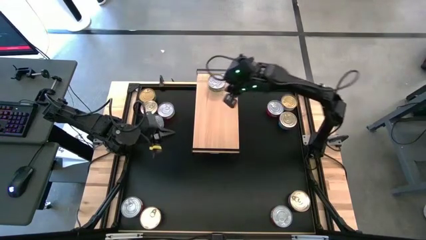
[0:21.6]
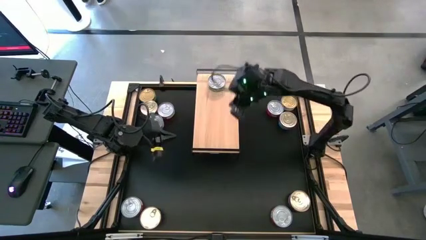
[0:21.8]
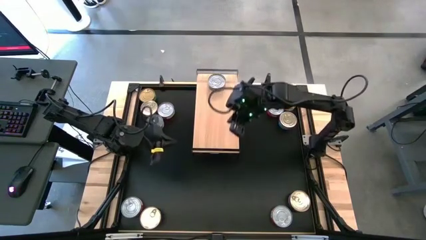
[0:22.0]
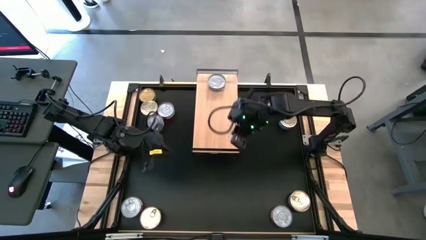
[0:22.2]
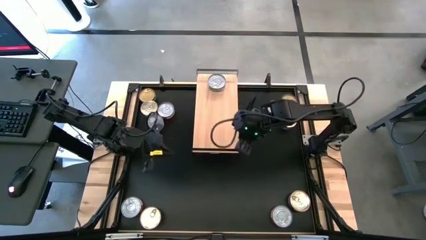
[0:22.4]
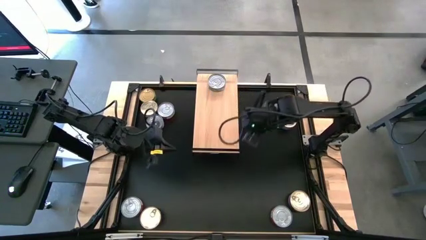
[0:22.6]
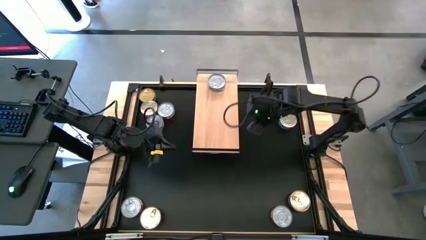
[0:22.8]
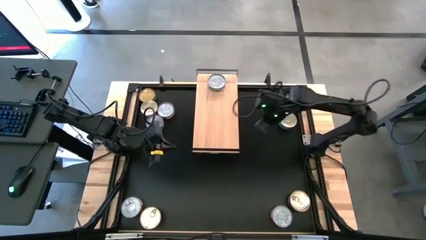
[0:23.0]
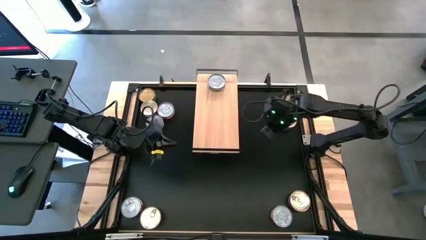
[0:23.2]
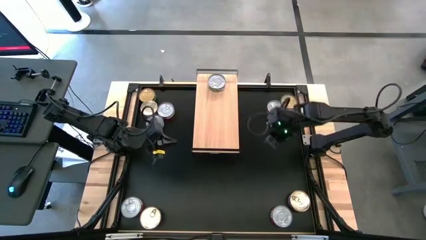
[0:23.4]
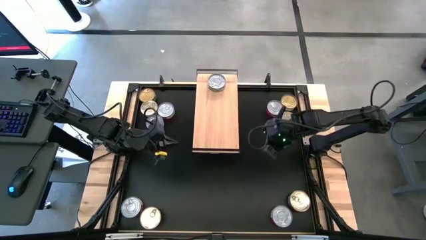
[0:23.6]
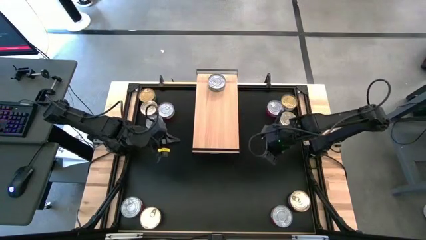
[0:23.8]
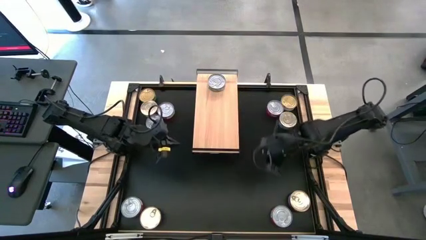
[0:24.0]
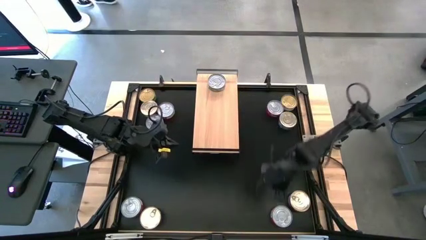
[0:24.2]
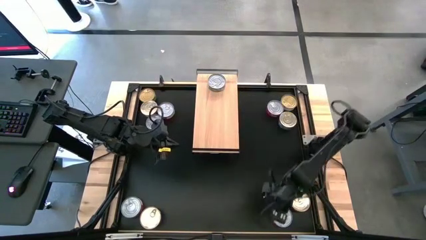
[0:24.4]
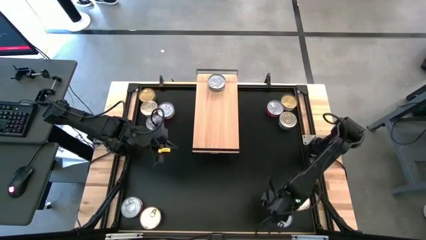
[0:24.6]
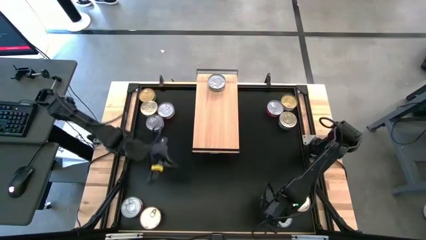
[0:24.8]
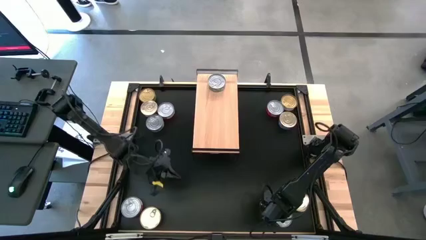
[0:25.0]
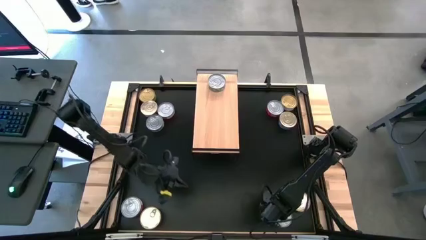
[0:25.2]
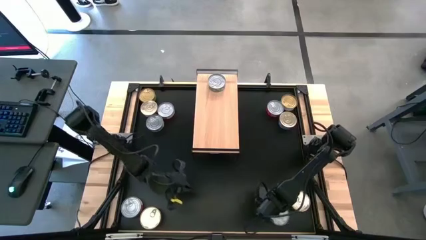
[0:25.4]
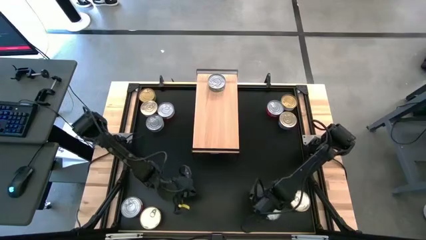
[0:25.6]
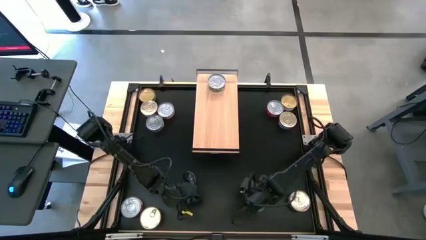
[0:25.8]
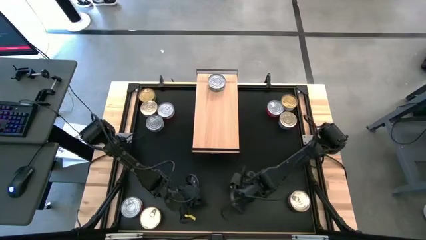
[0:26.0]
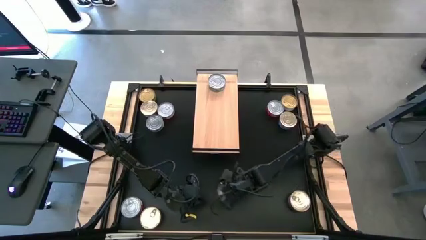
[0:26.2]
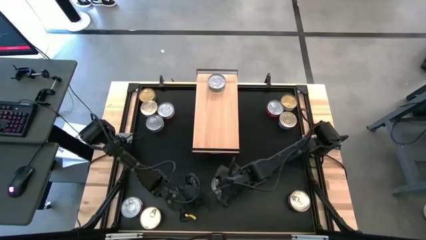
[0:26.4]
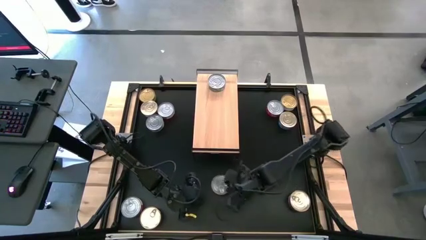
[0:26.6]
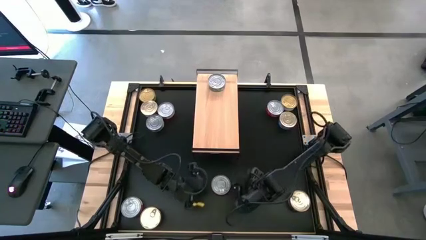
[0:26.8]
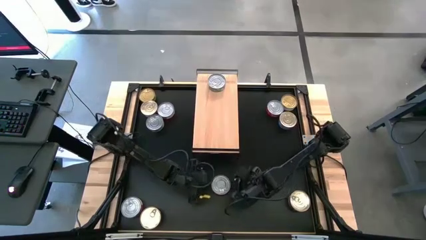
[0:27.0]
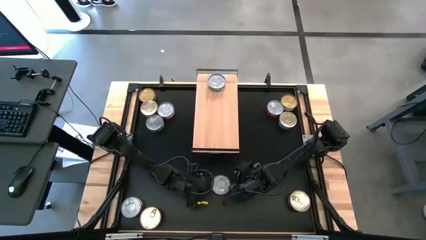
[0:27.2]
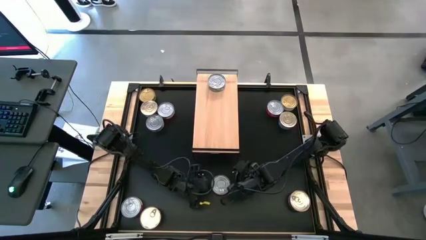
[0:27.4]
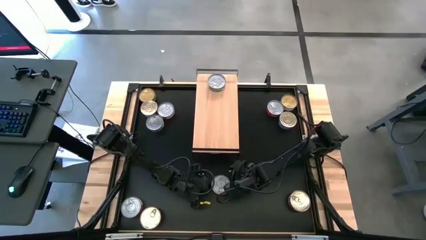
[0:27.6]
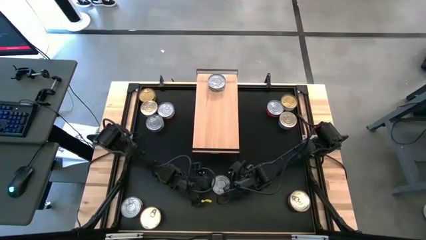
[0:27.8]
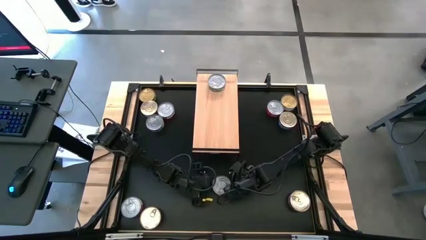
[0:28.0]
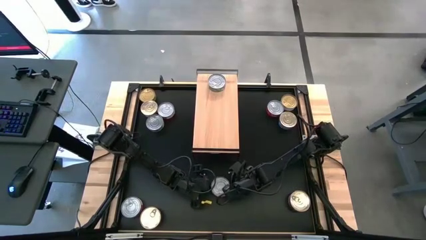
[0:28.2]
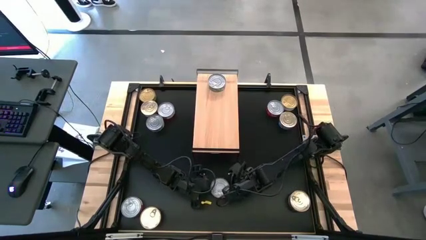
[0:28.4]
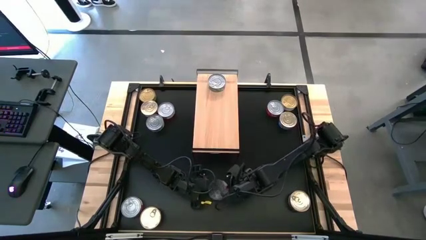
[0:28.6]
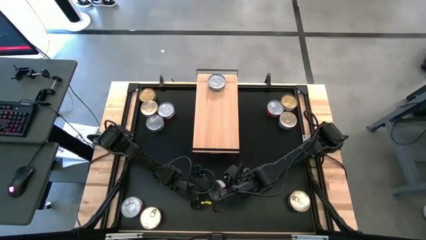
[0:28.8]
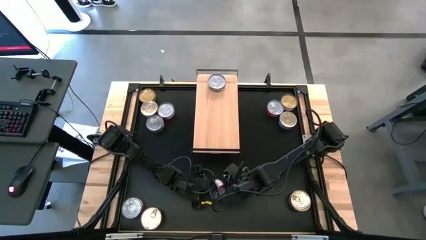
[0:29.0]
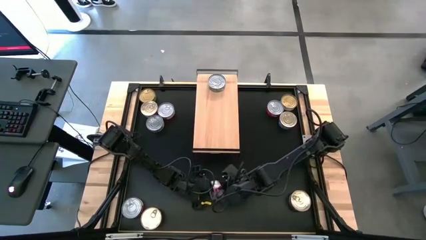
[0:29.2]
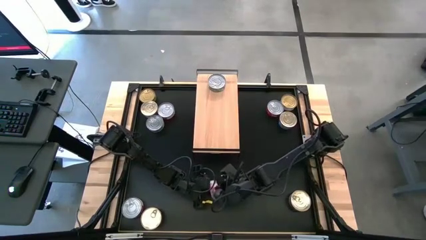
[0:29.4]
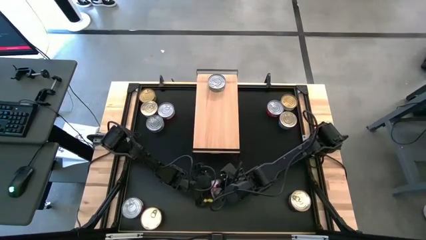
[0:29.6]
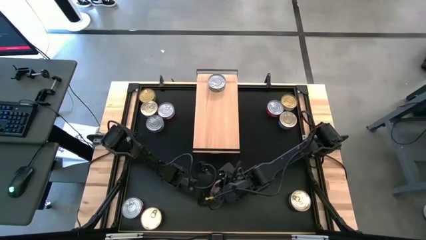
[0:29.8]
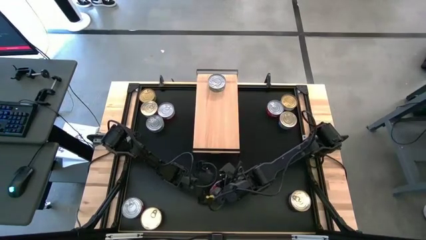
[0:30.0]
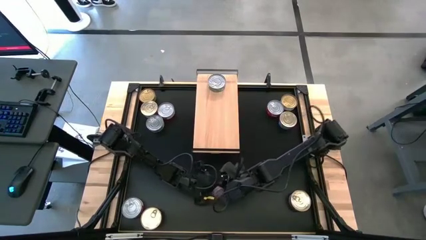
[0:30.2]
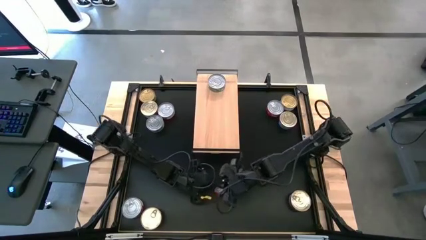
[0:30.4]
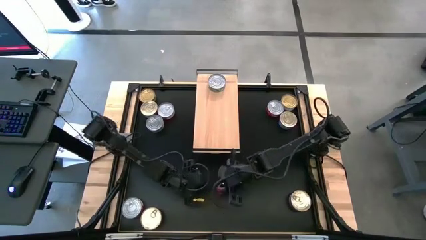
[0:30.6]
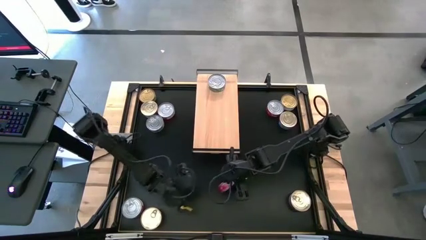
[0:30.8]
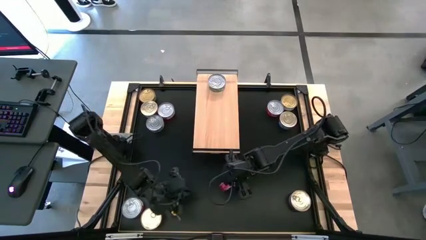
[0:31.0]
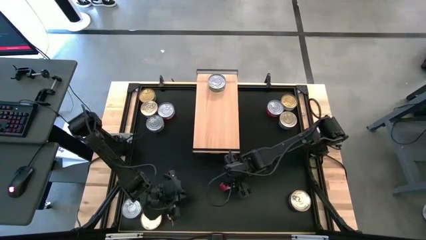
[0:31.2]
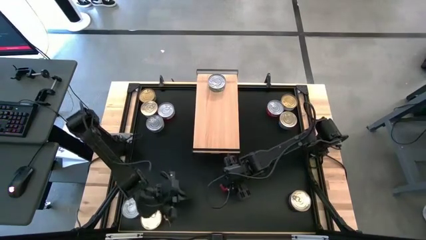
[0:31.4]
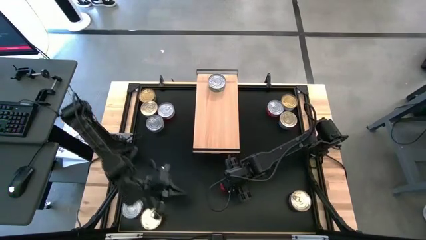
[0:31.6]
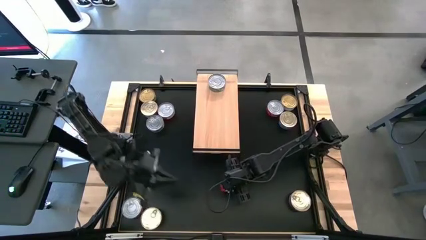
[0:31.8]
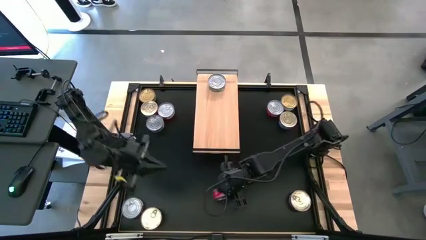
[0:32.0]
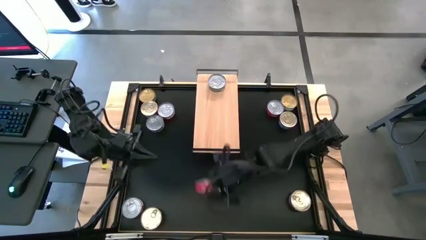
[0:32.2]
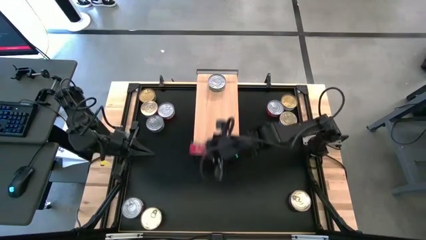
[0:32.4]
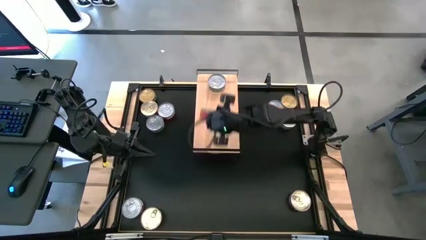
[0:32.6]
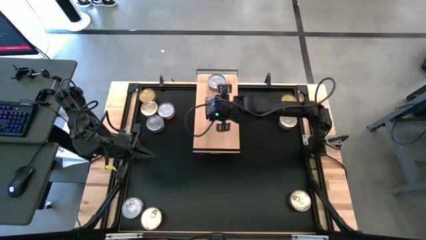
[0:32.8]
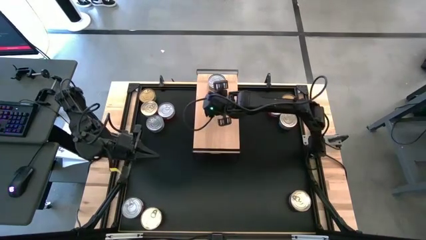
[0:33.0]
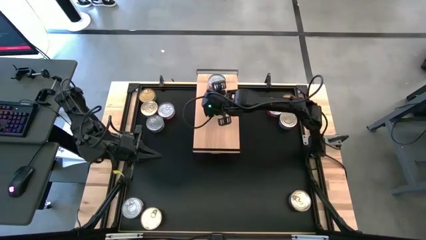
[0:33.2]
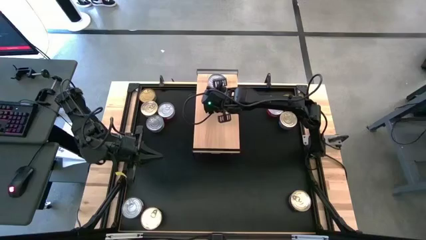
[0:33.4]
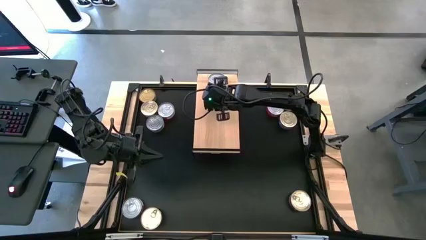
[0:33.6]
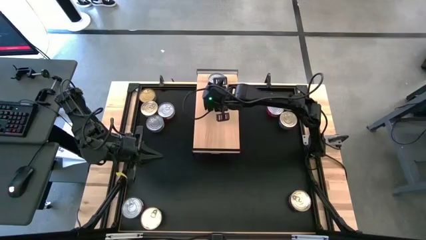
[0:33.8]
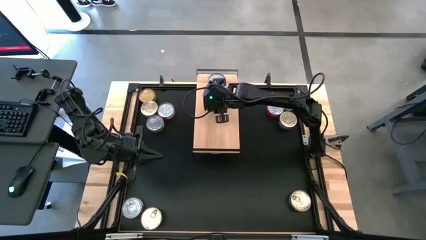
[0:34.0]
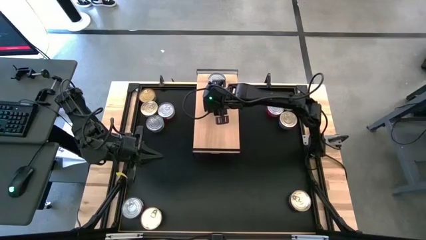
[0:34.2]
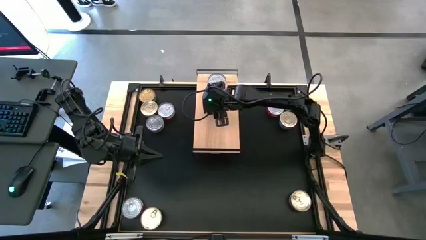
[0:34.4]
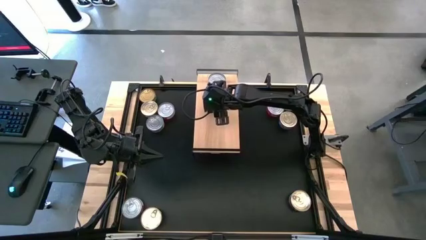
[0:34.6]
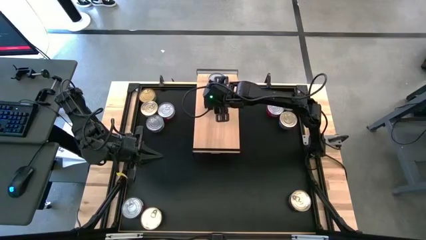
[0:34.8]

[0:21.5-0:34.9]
Task: Stack canned seafood by type on shelf
Put the red tuna can on the shelf
